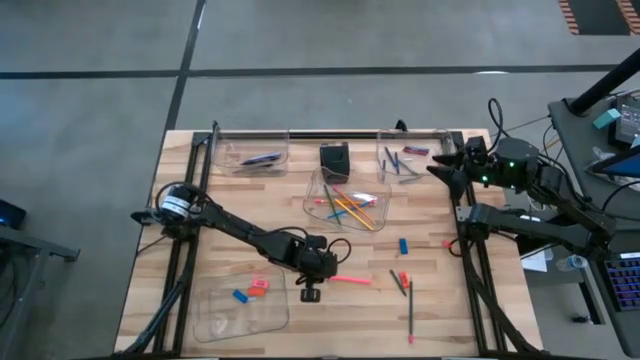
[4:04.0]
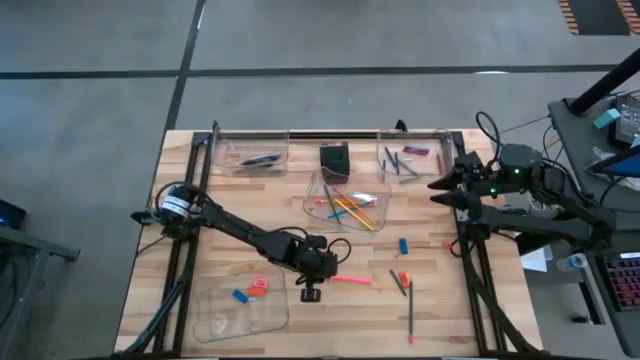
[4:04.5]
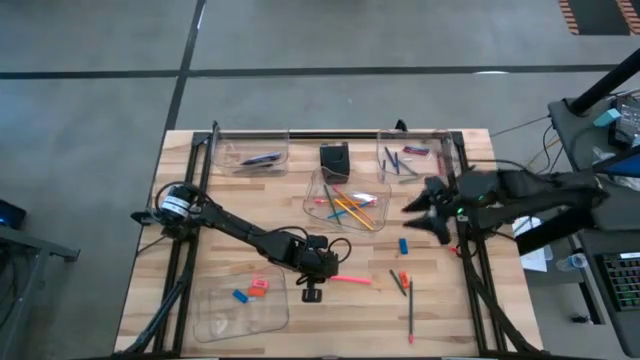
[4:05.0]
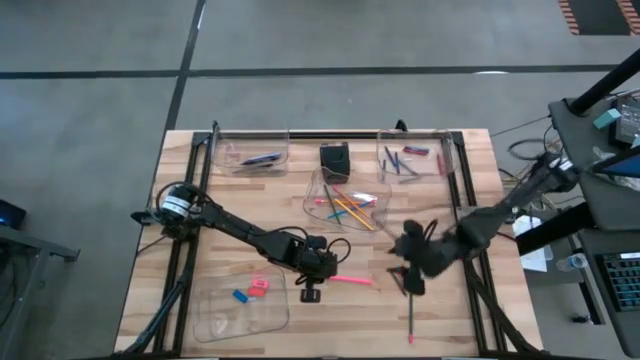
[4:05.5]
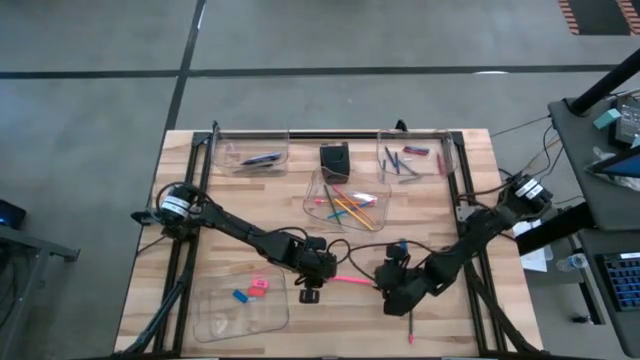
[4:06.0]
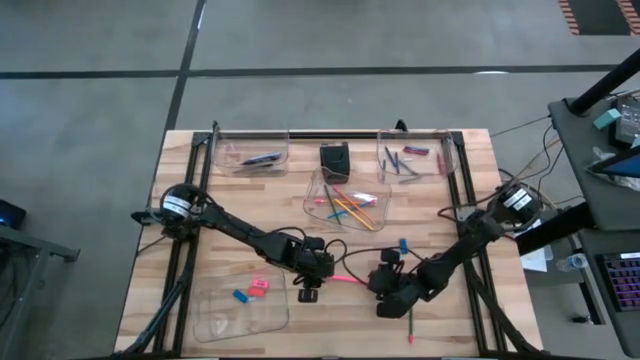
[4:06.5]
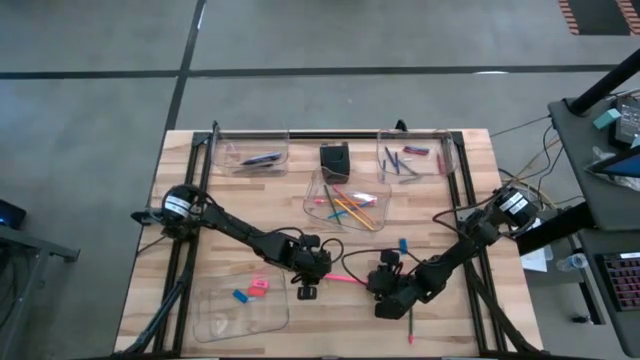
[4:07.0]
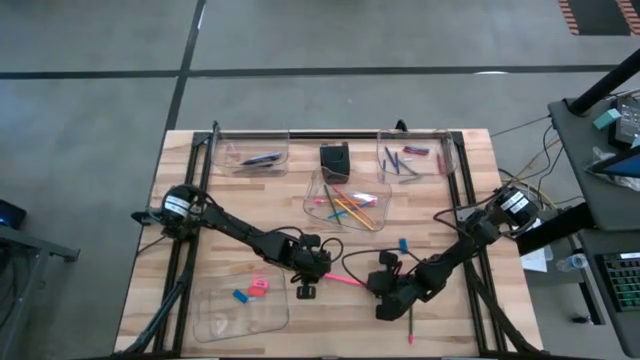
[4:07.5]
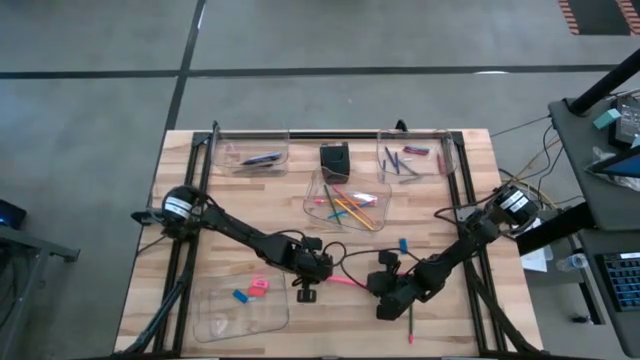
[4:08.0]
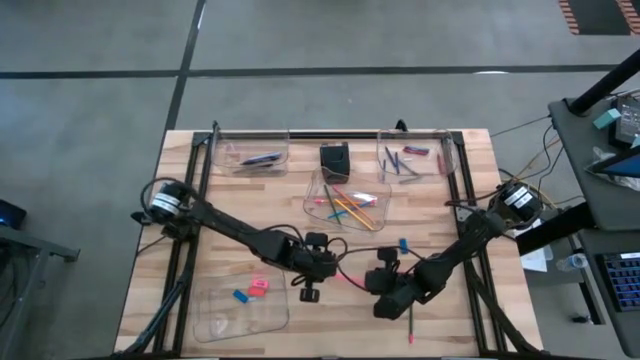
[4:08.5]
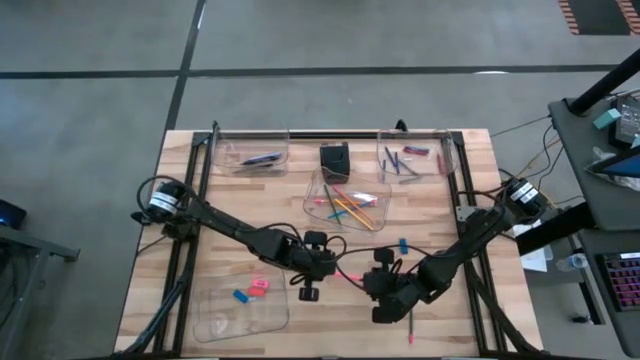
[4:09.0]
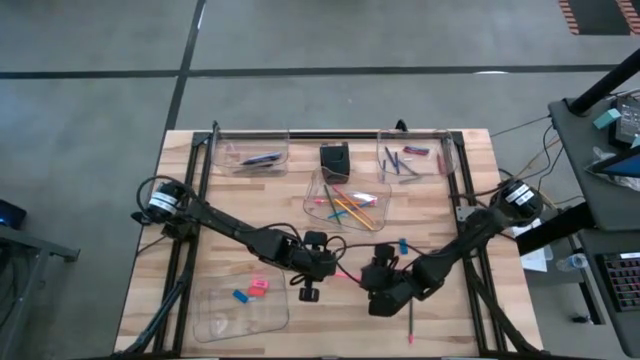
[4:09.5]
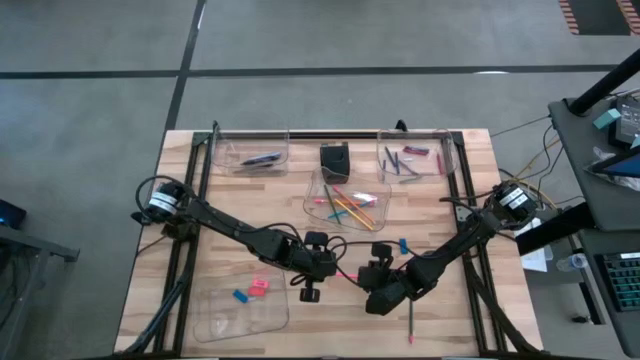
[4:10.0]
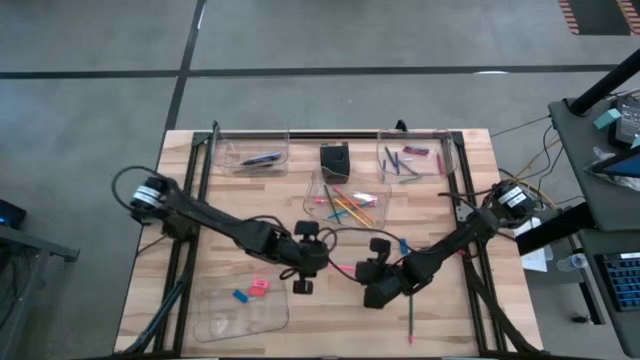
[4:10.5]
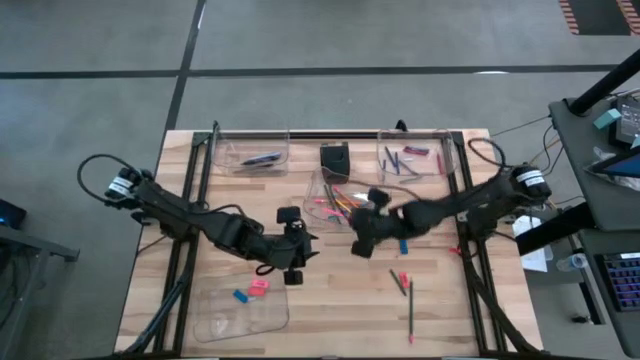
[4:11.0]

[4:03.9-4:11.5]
Task: Sort crayons/erasers/pens/pencils in bins
Put the pink pencil into the middle transparent bin

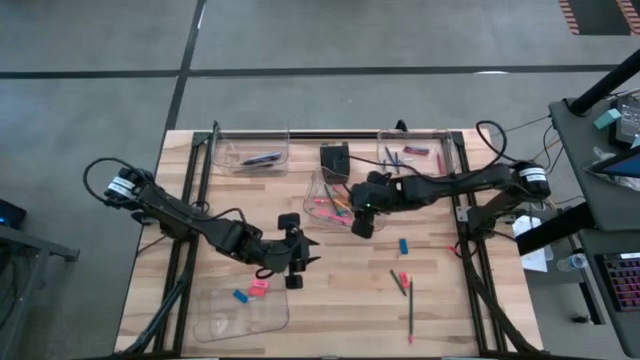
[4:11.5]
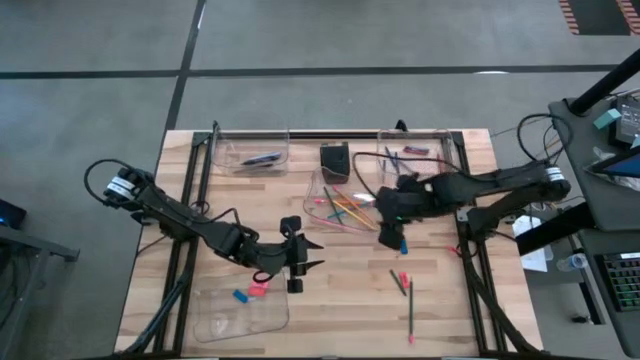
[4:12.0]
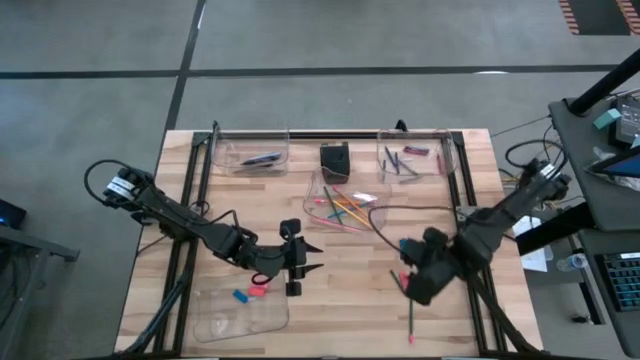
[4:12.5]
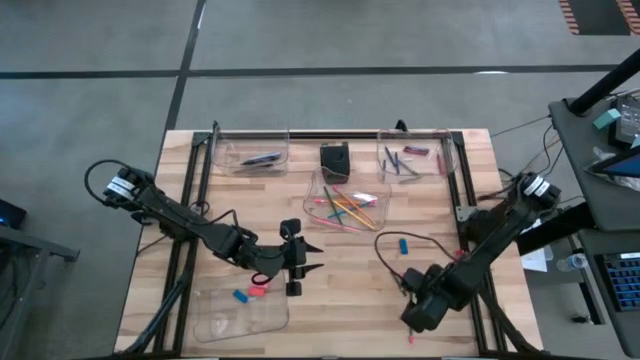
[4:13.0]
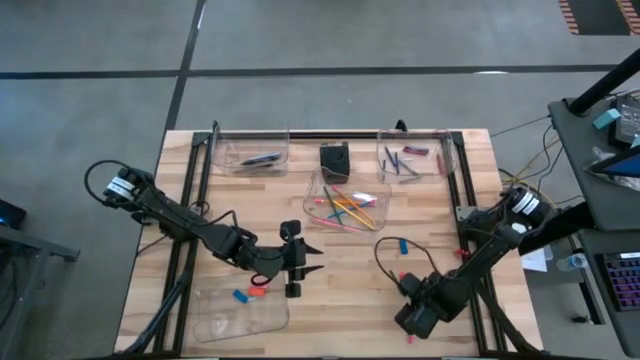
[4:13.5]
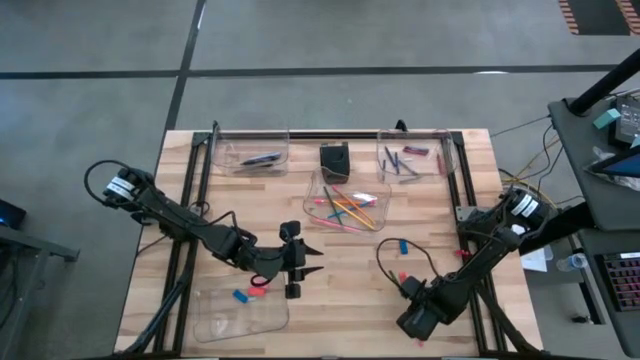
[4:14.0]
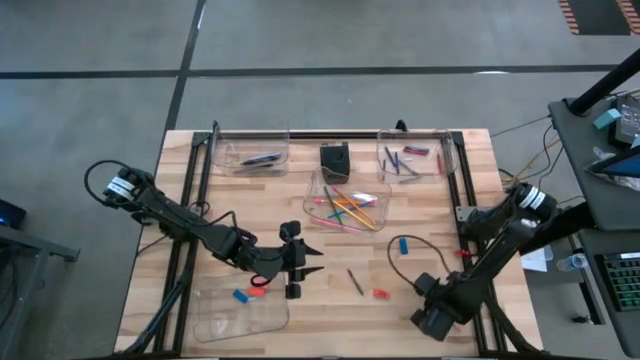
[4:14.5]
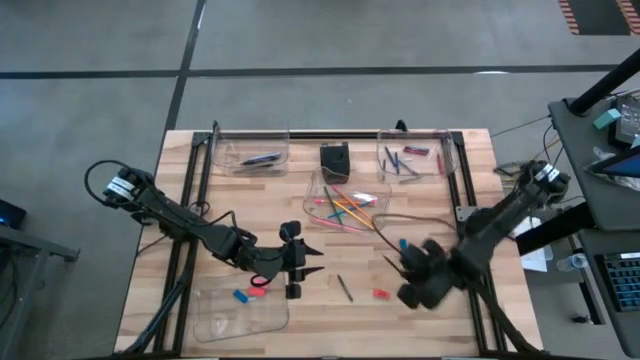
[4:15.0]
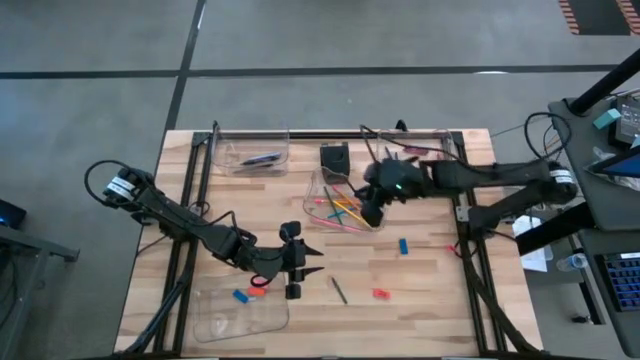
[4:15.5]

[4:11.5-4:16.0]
Put the green pencil into the middle transparent bin

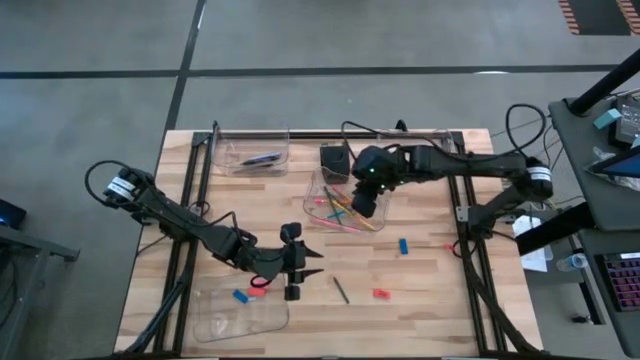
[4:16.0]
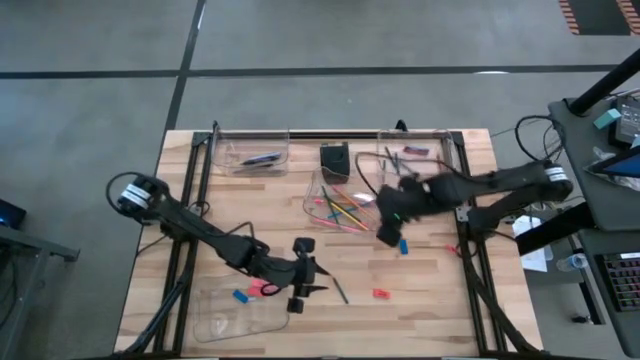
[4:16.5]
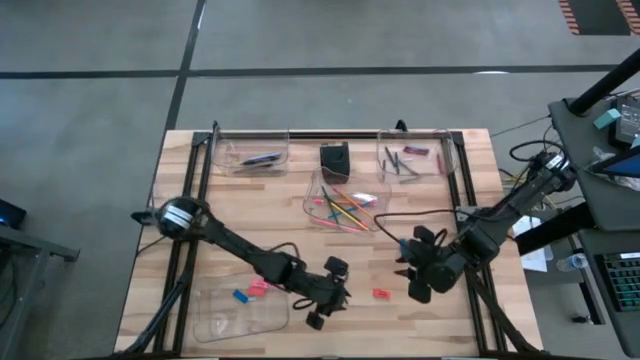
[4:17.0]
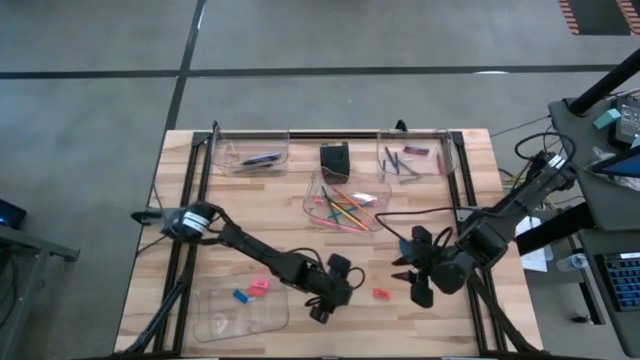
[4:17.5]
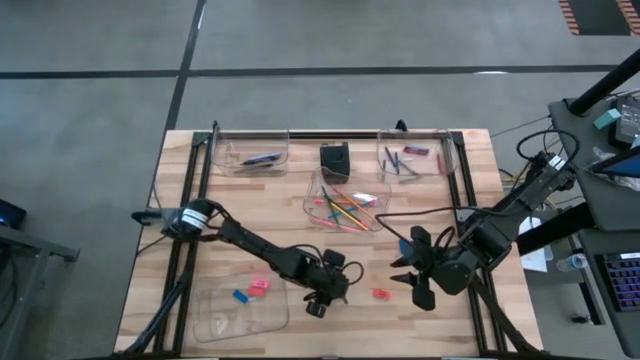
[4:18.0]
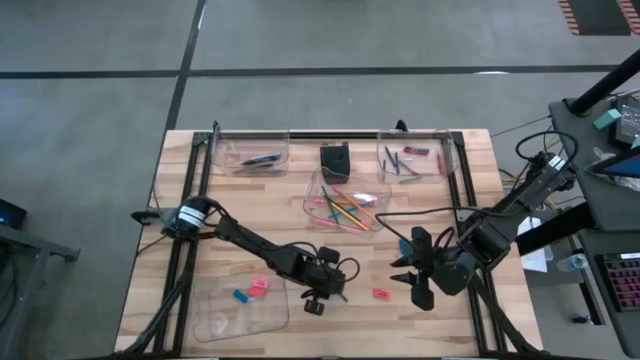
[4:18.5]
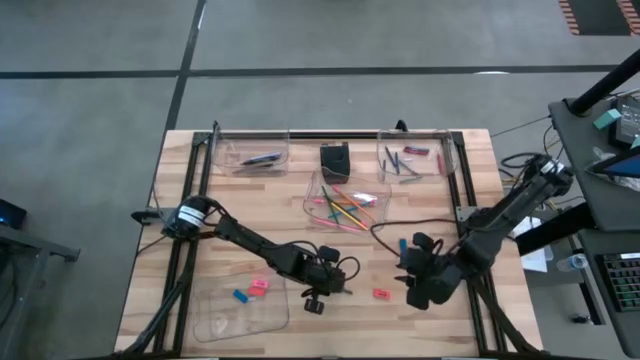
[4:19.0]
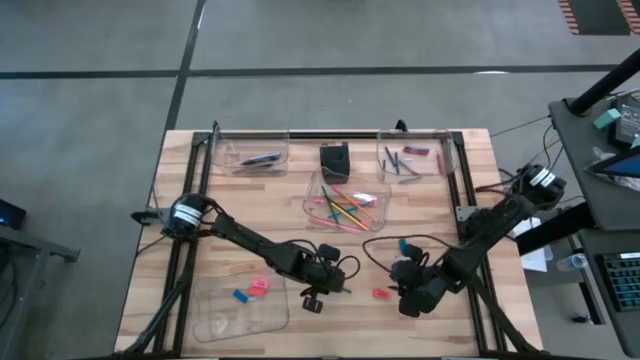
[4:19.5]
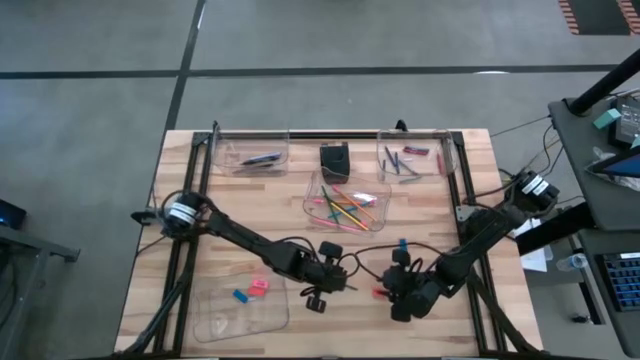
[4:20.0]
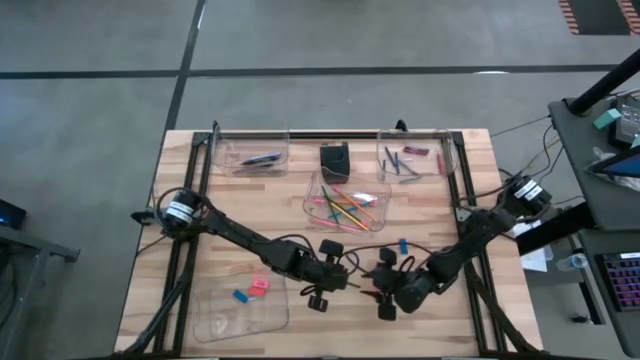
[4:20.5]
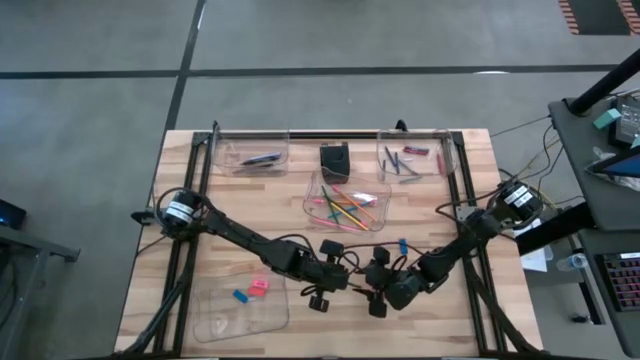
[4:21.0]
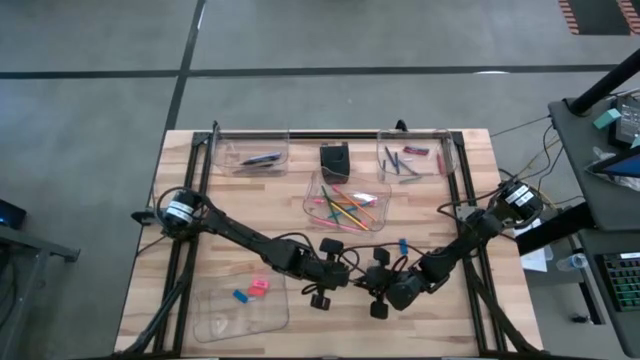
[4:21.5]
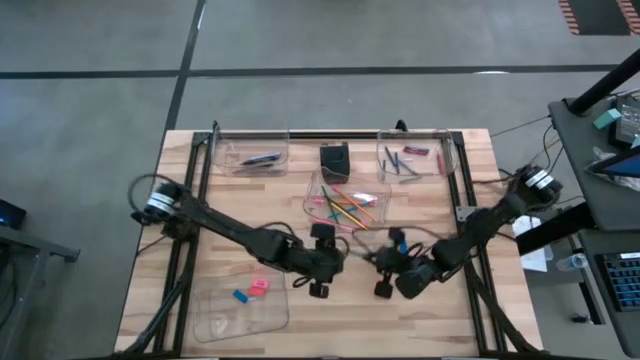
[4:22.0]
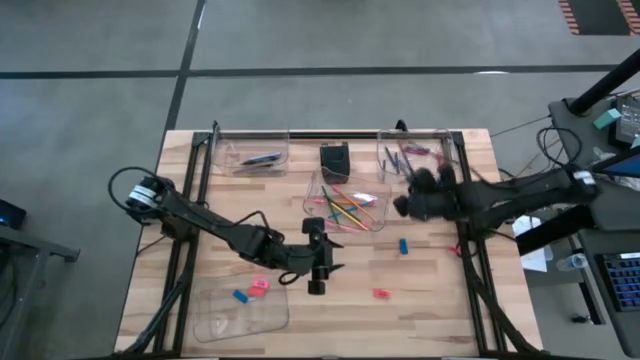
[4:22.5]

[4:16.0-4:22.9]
Put the green crayon into the top right transparent bin

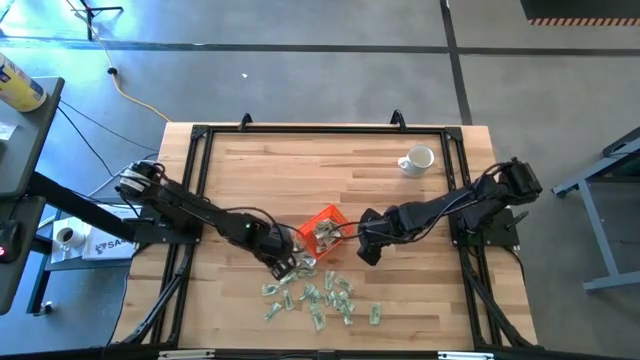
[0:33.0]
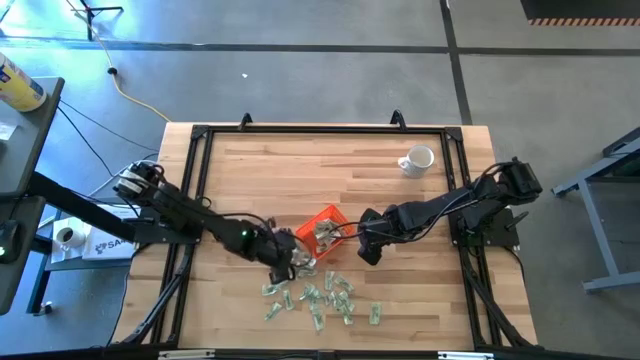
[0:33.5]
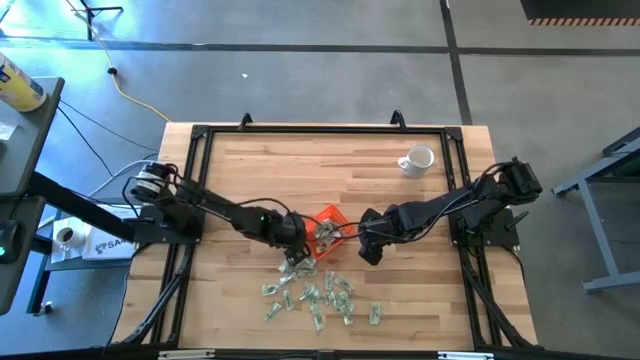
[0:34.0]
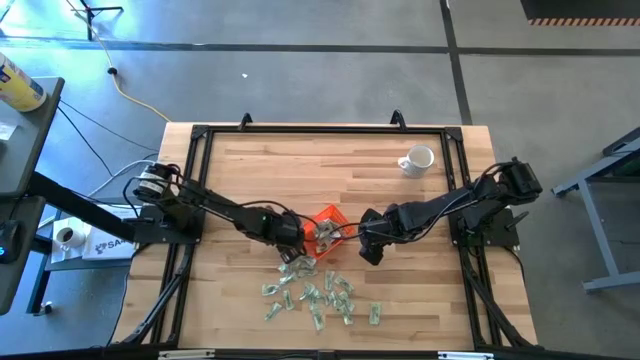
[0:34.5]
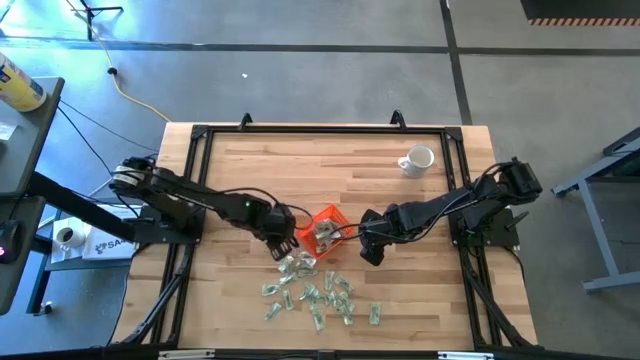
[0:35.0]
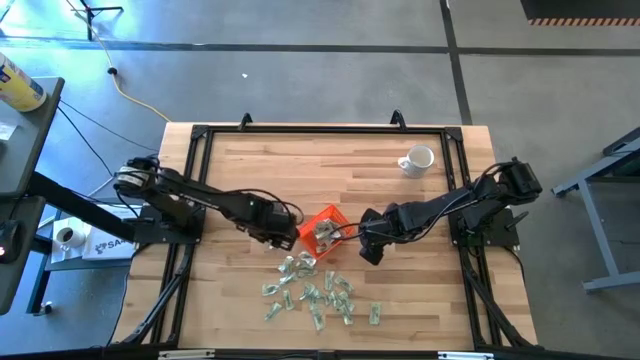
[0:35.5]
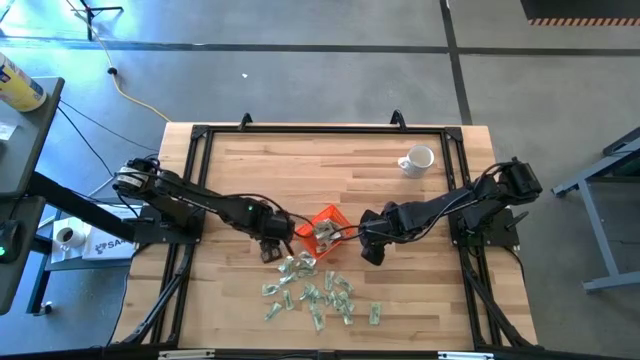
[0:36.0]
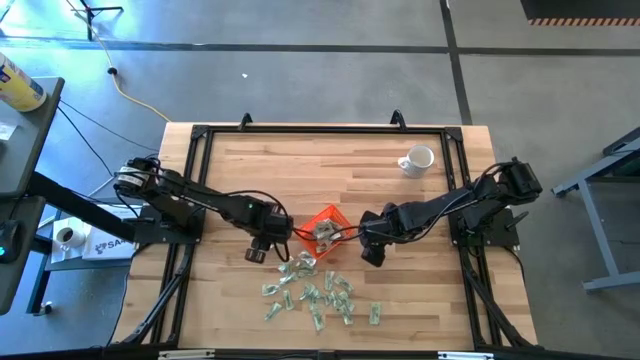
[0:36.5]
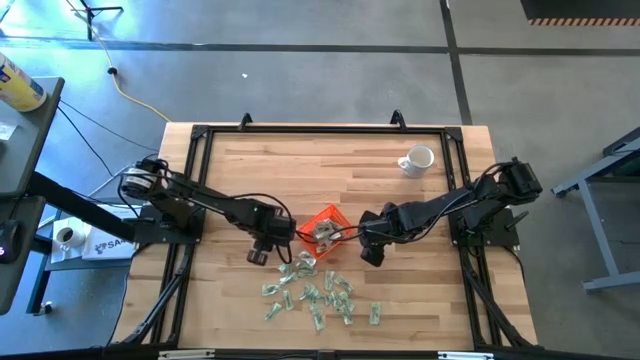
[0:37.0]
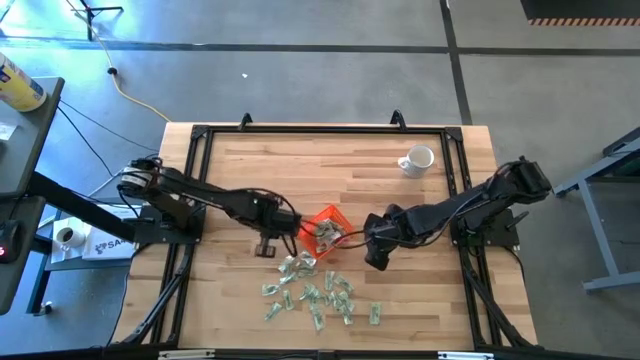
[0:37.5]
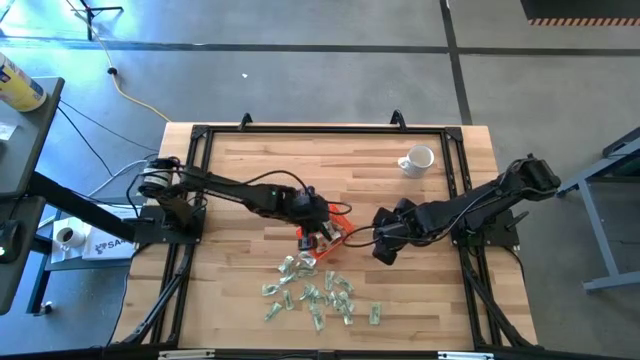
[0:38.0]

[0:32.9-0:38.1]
Task: Pick and place Stevia / Truvia into bins
Put the stevia packet into the orange bin
